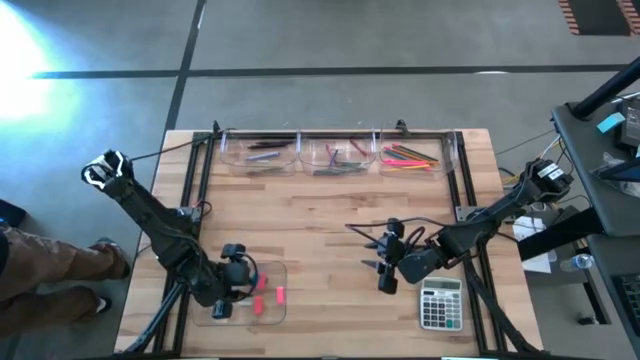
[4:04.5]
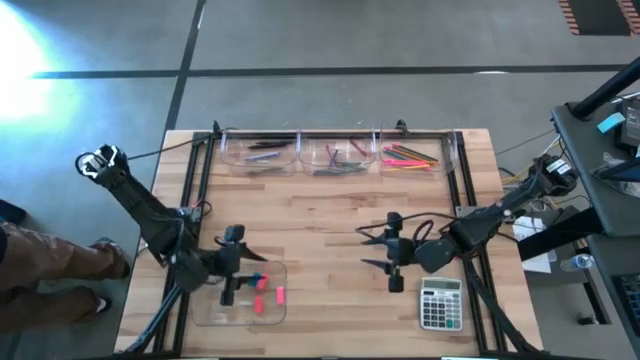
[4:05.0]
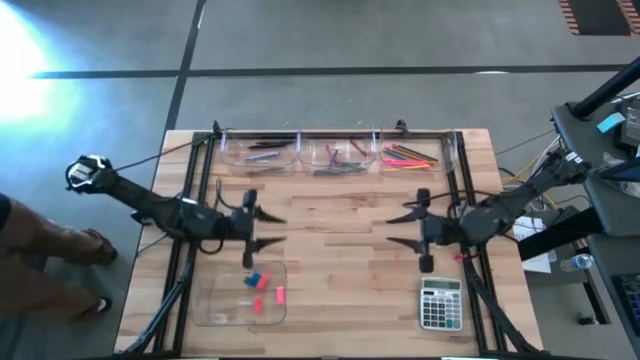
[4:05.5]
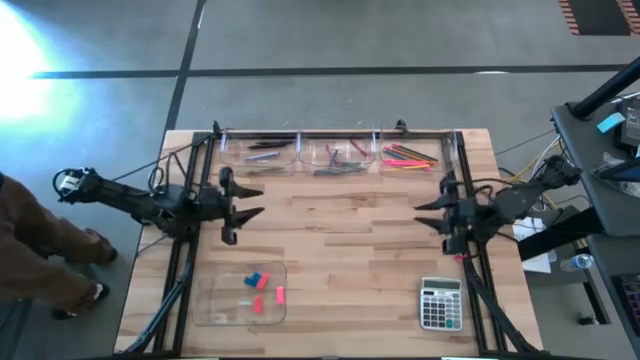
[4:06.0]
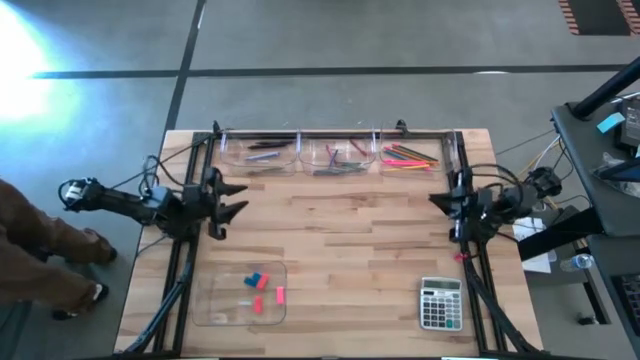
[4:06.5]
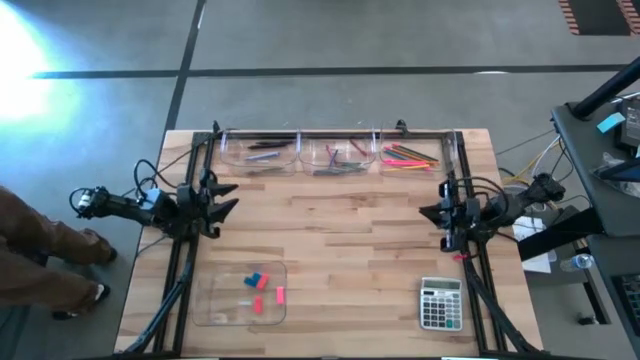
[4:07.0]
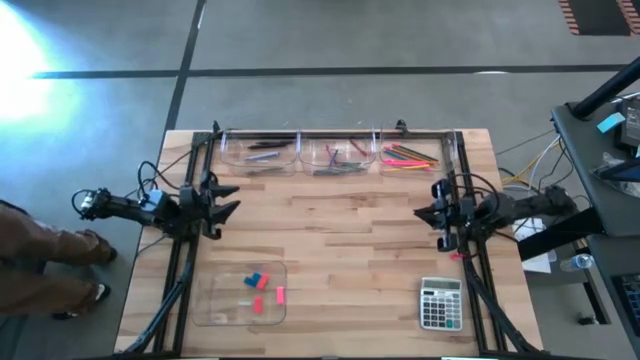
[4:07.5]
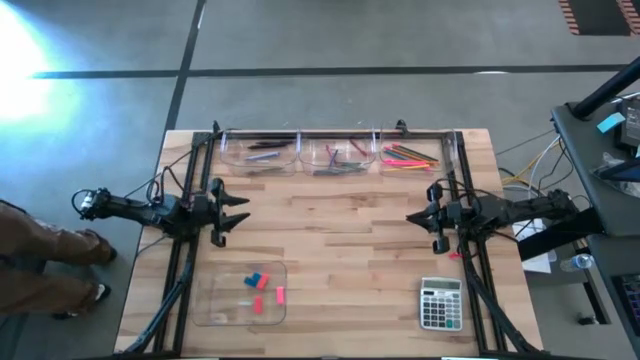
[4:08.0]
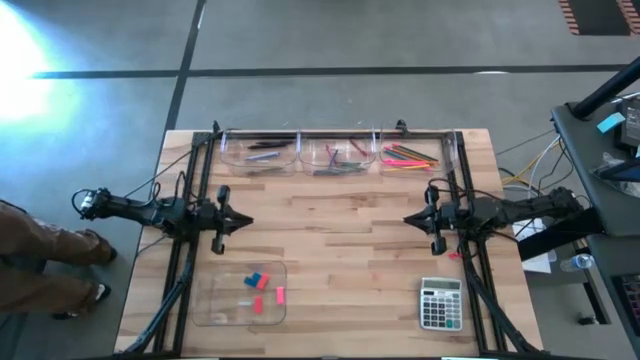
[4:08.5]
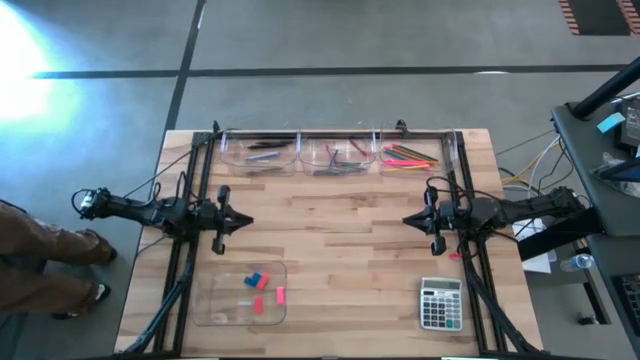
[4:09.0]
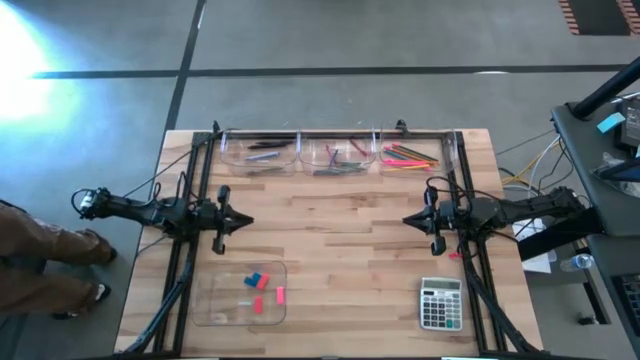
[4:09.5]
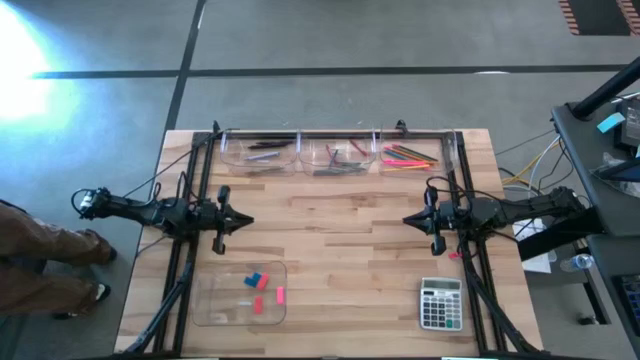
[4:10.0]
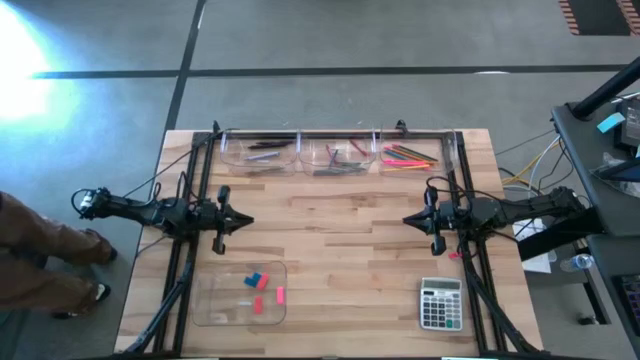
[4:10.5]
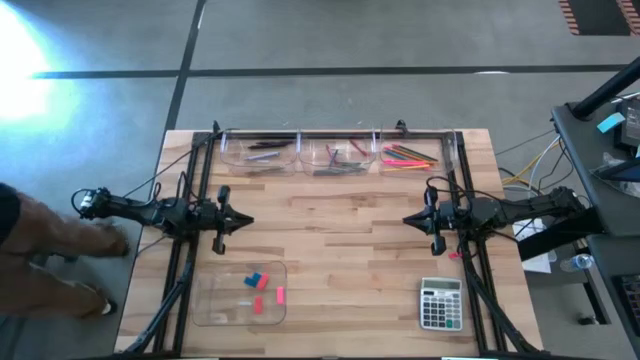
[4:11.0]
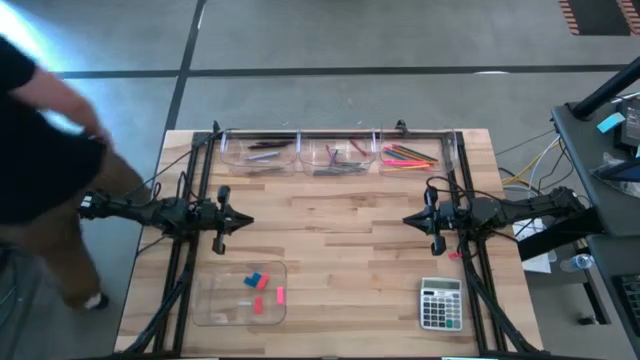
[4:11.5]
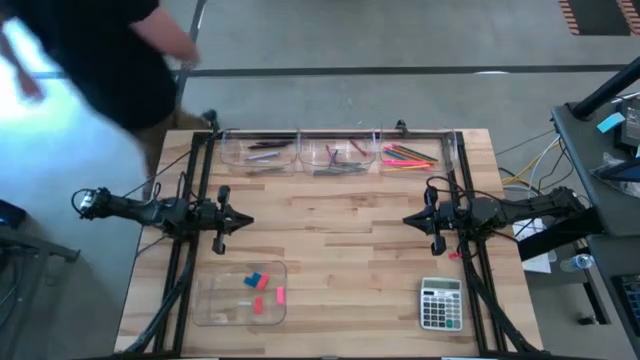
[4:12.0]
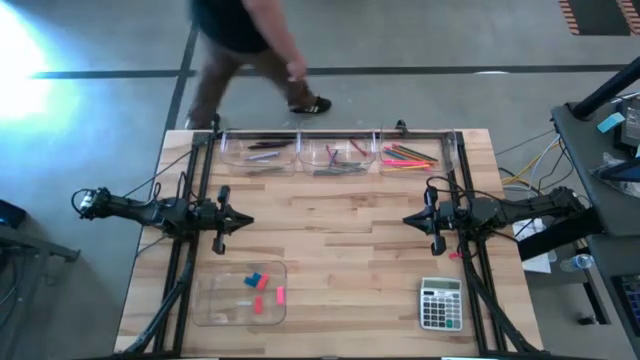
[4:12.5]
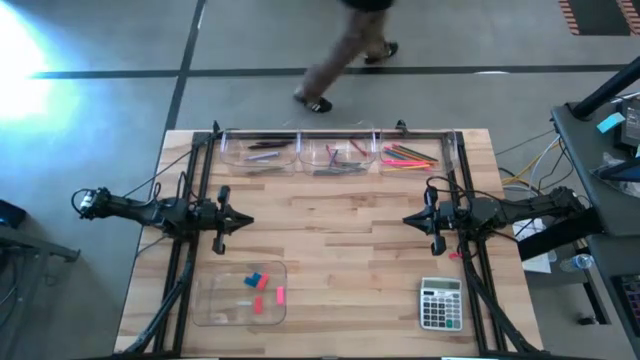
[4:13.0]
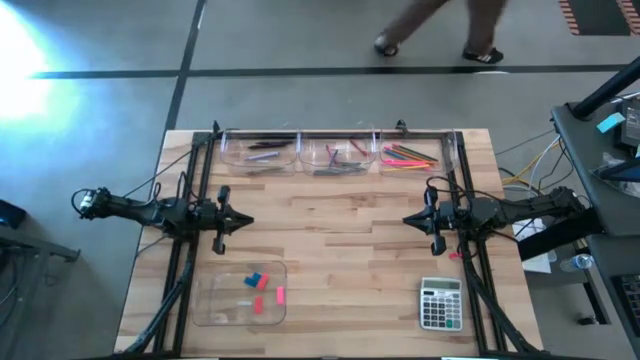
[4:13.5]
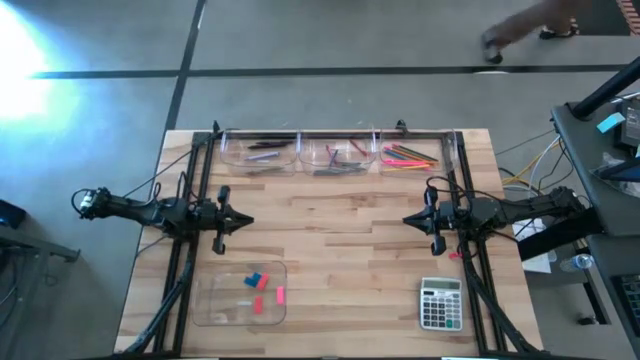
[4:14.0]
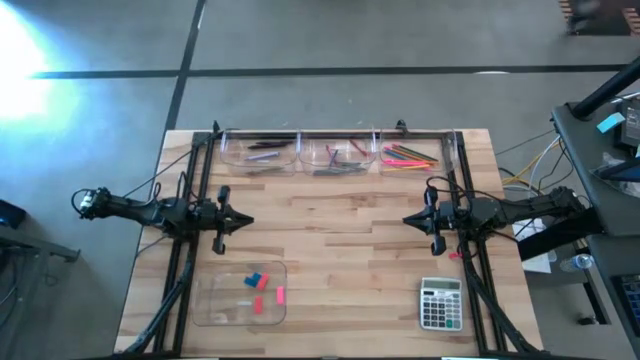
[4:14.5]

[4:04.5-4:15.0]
Task: Sort crayons/erasers/pens/pencils in bins
Return to Home Position

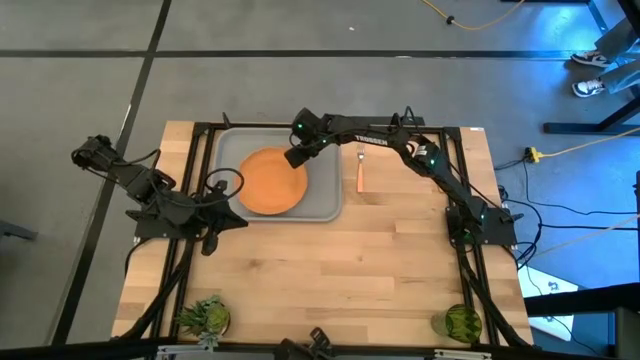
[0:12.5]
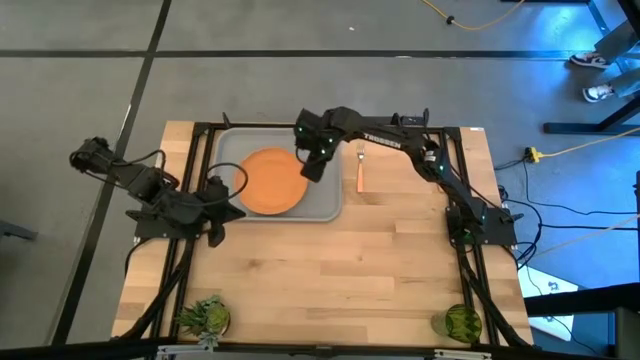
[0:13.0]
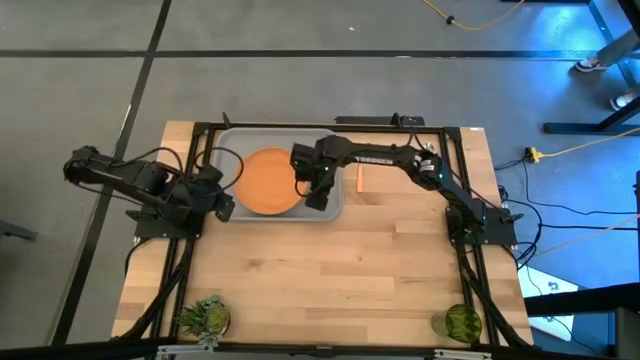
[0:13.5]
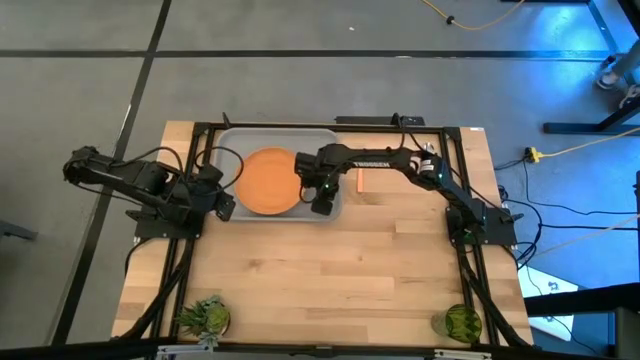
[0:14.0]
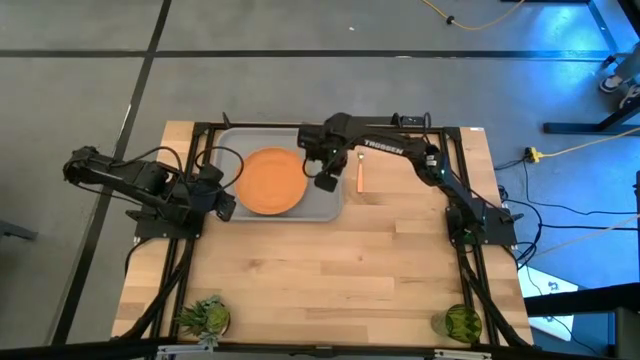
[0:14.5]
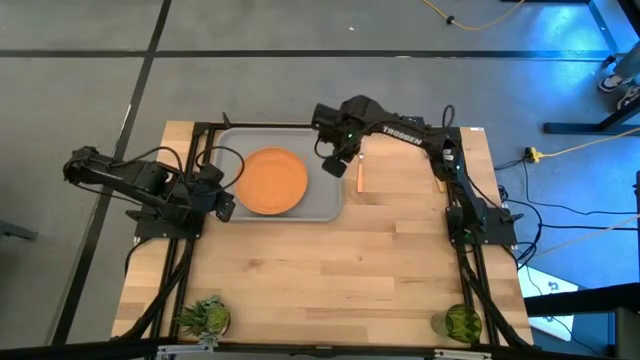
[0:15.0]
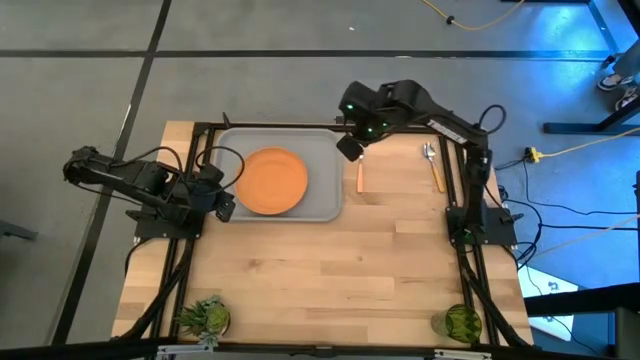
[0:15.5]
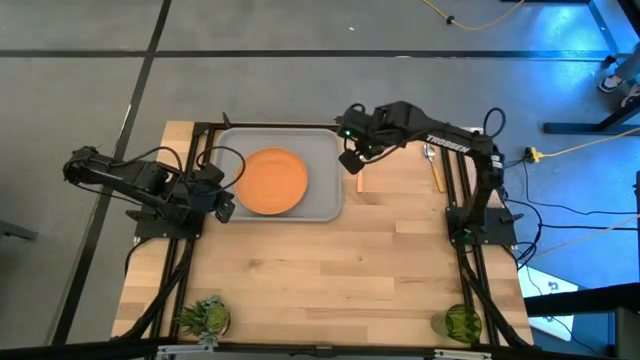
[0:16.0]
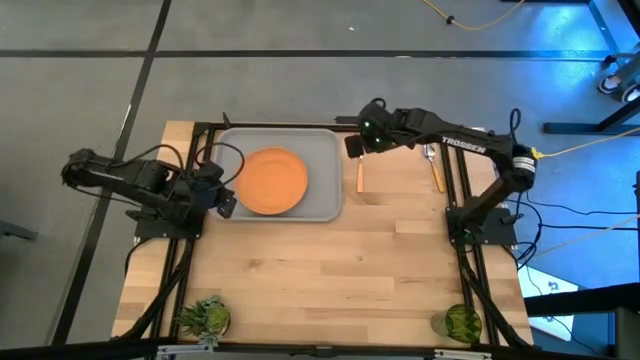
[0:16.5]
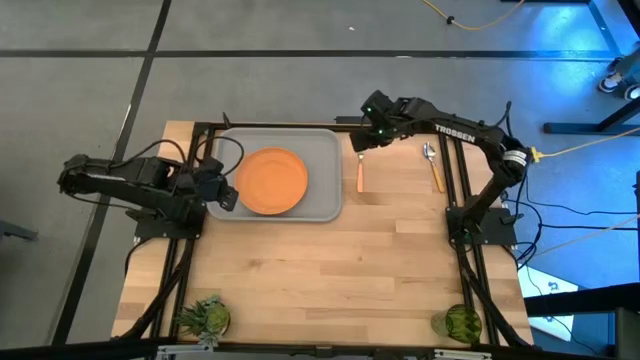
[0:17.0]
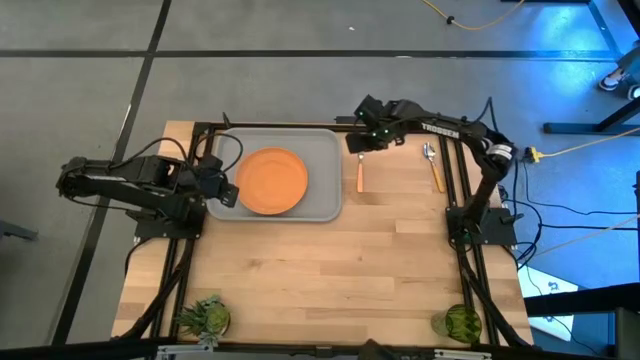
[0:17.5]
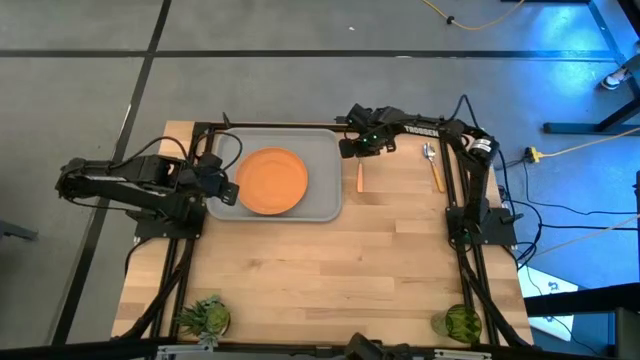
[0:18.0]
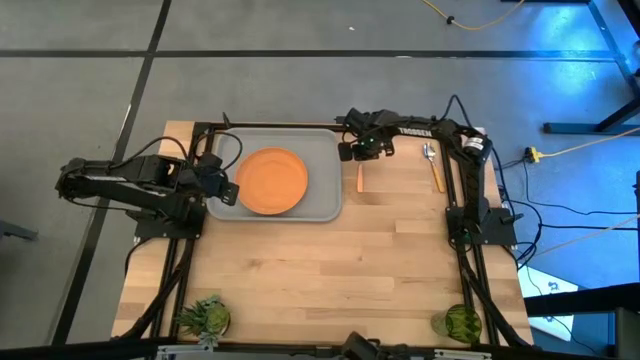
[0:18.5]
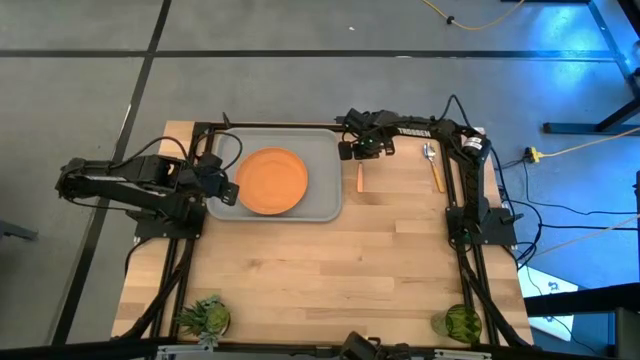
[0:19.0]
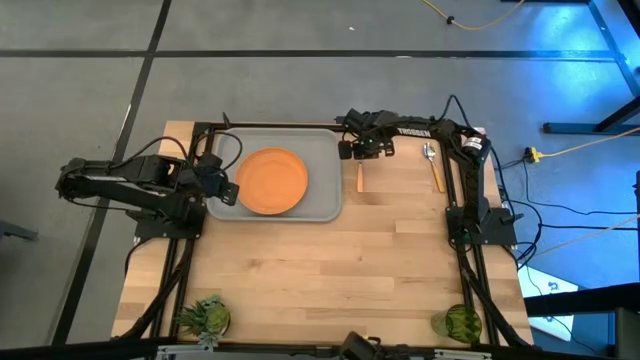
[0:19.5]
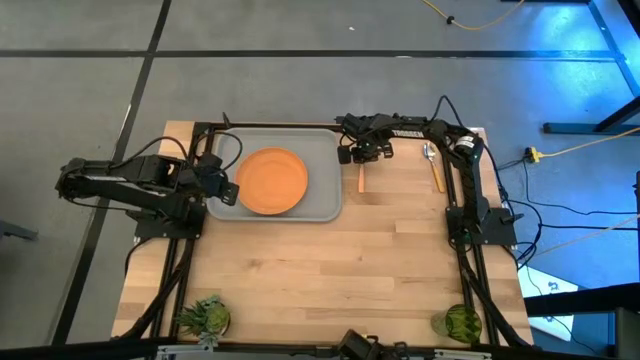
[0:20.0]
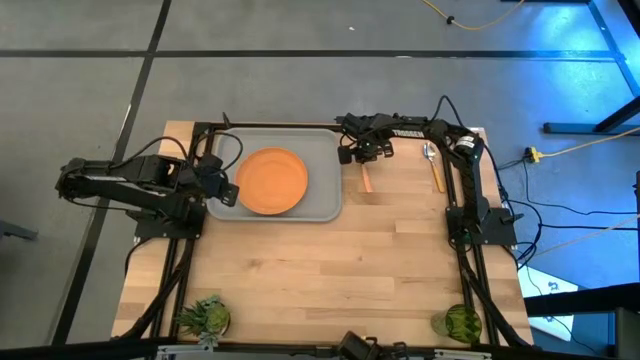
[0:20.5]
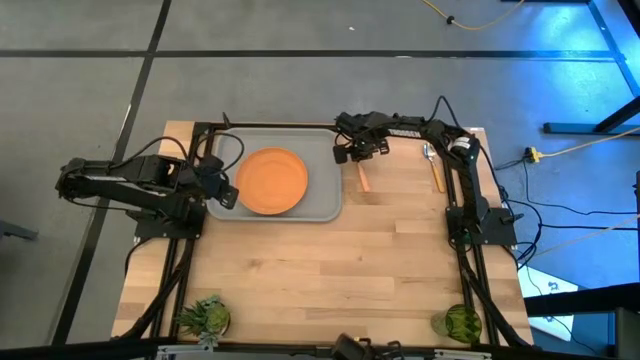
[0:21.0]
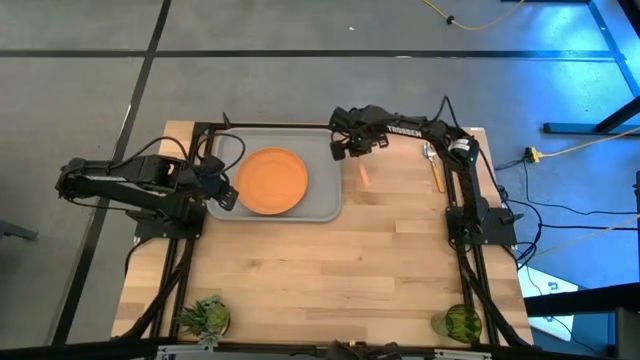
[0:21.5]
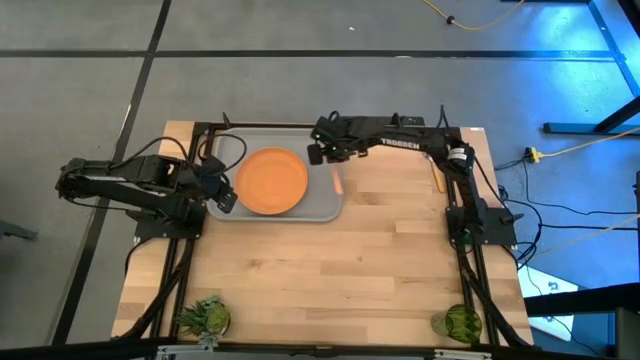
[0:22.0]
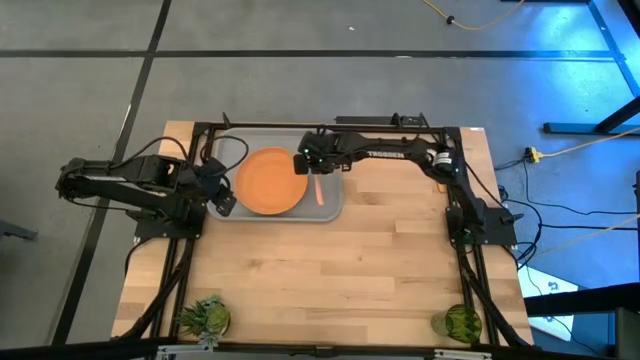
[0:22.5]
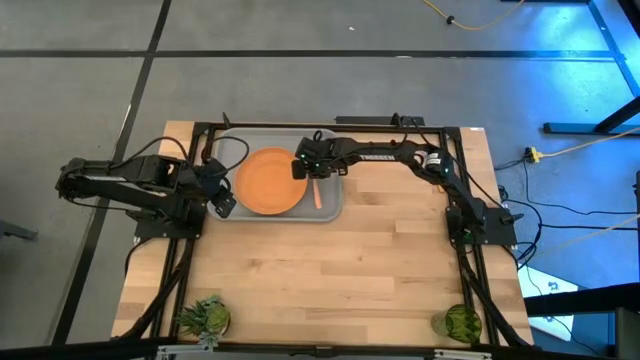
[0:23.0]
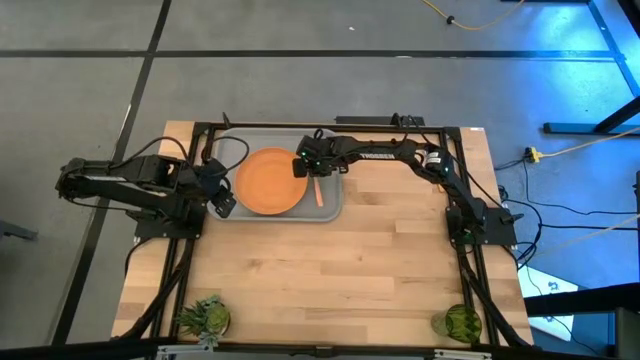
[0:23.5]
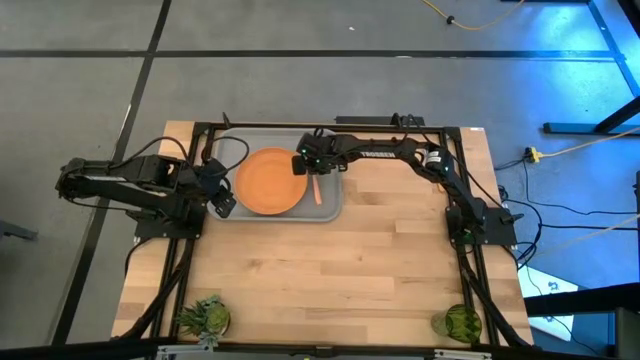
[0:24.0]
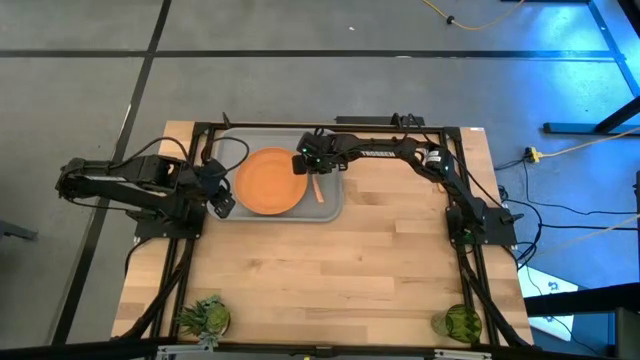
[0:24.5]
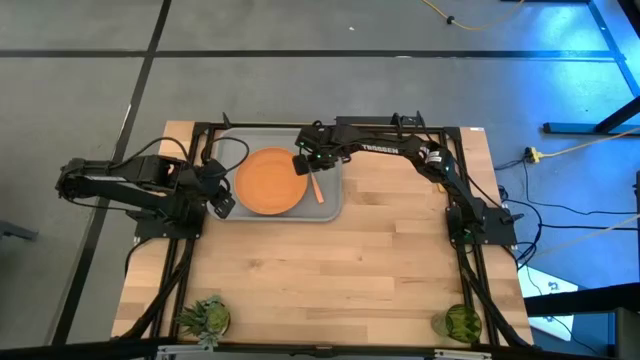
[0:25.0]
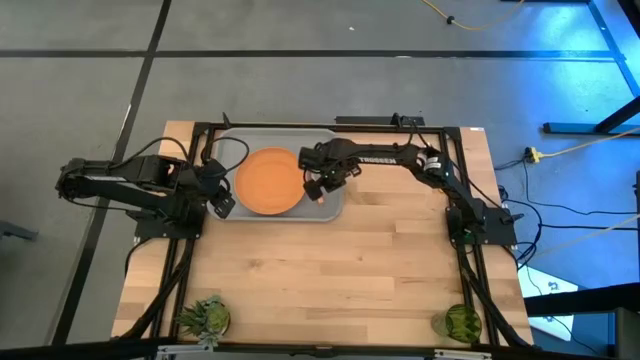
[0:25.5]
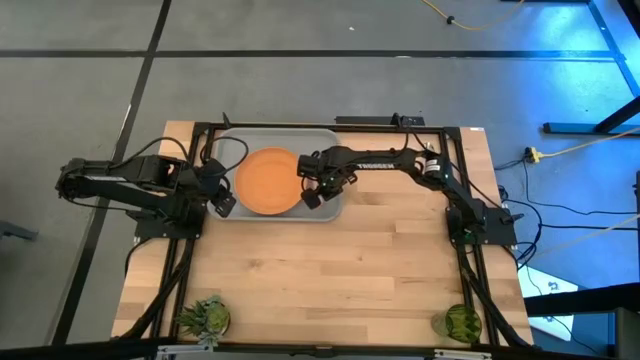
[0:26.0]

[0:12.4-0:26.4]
Task: Pick and place plate/cup/fork/spoon on tray
Put the orange fork on the gray serving tray to the right side of the orange plate
